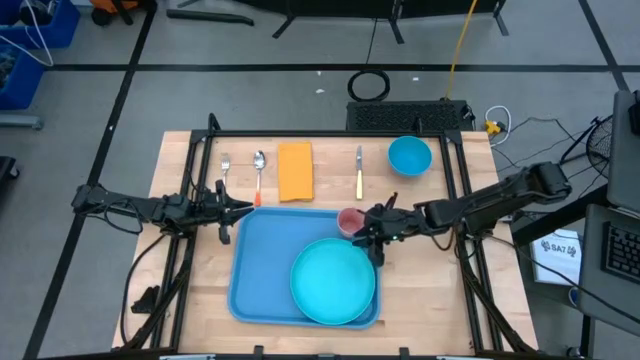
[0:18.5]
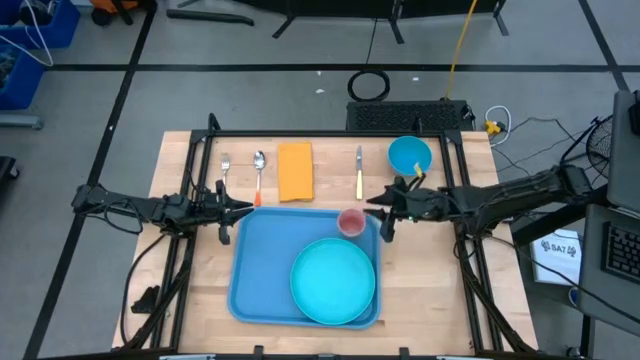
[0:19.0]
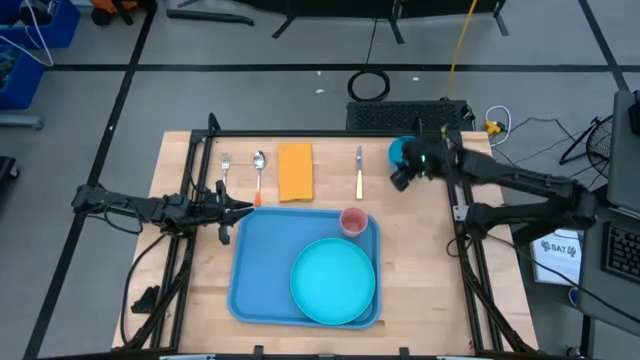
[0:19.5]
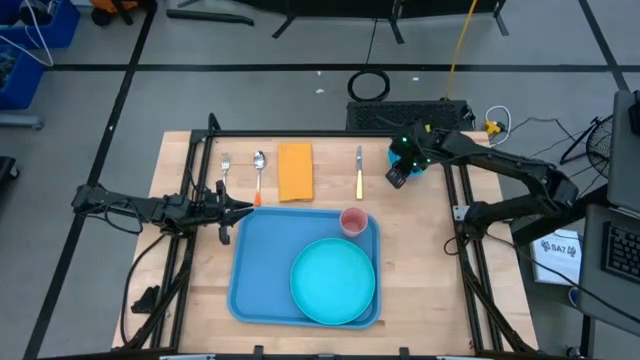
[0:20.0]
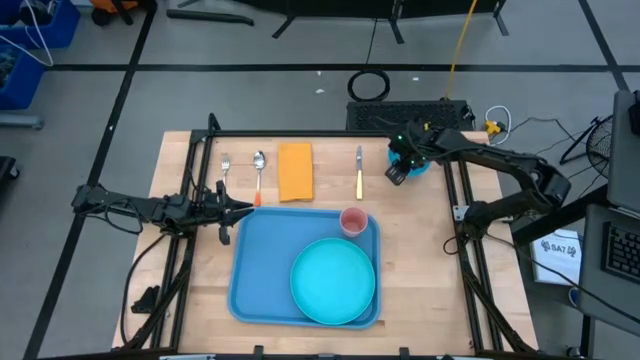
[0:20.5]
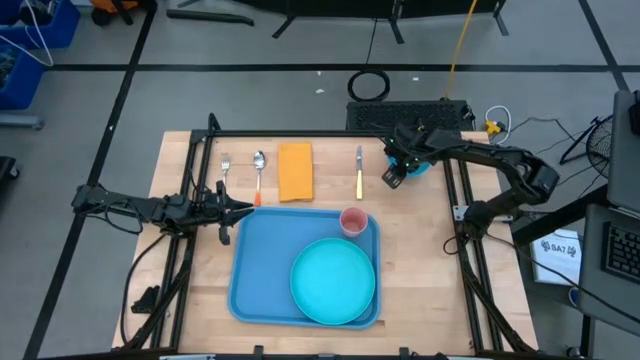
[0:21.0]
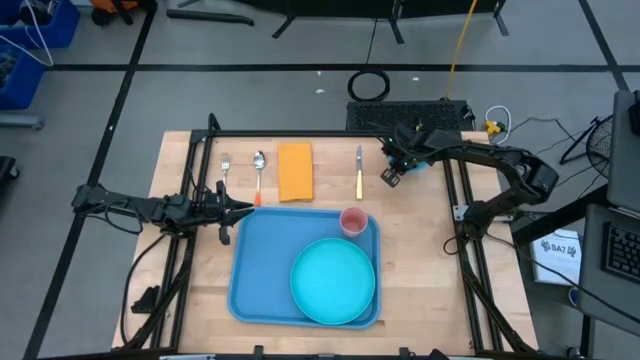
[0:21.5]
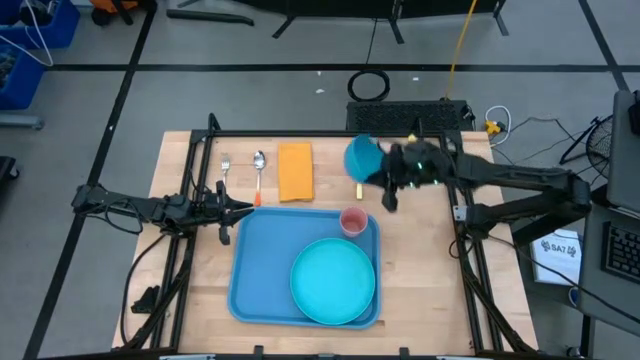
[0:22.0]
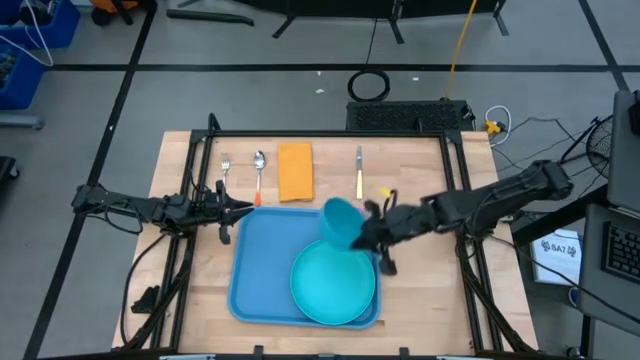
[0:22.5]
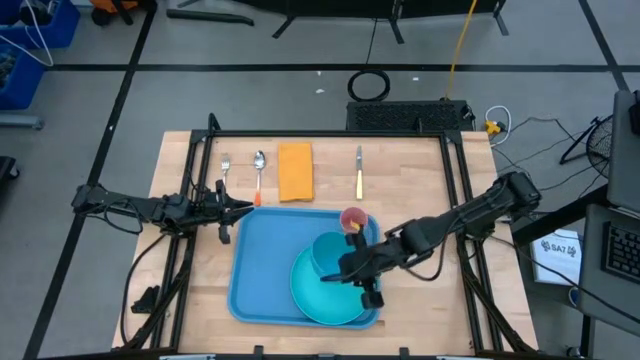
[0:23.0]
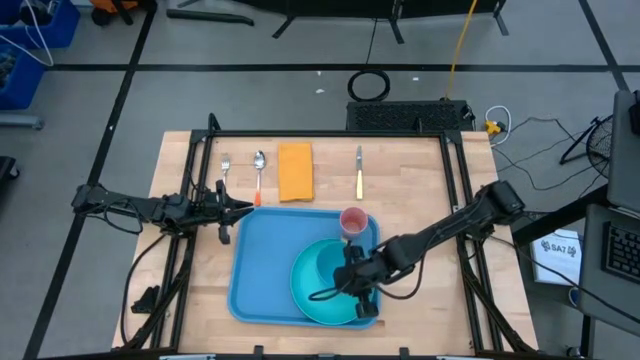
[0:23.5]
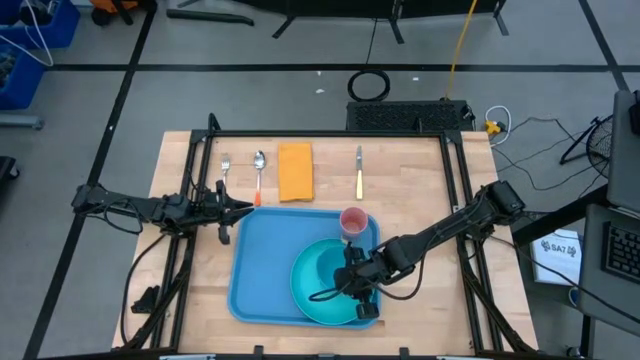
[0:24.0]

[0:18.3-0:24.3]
Task: Set up tray
Put the blue bowl on the light blue plate

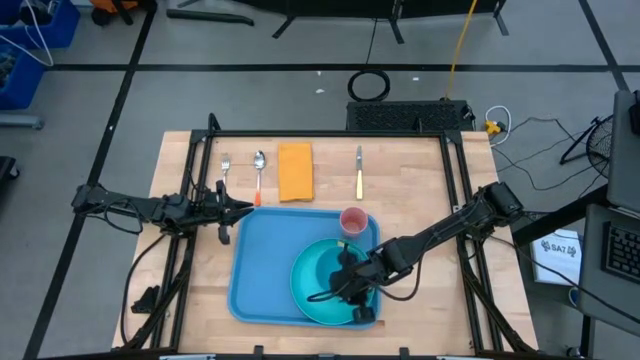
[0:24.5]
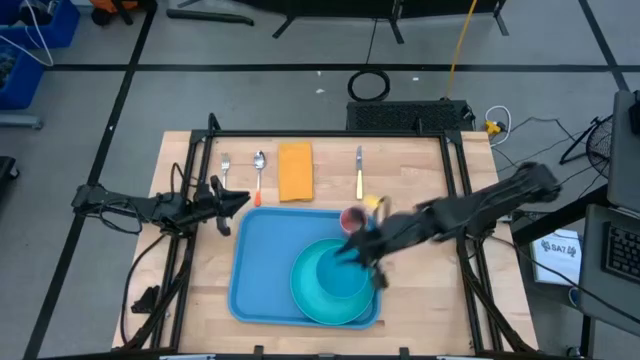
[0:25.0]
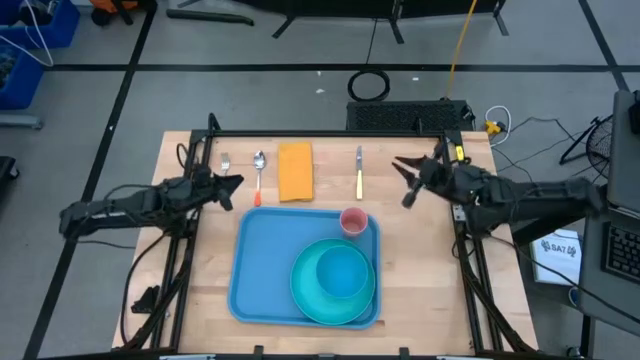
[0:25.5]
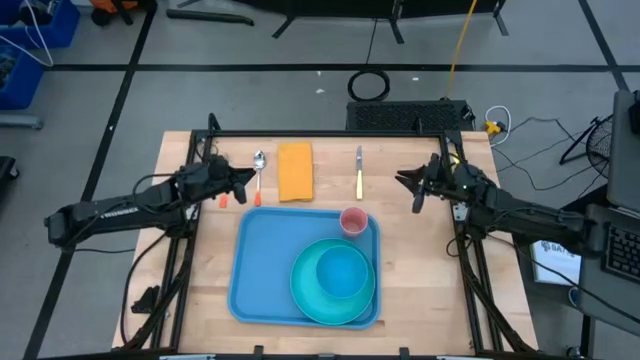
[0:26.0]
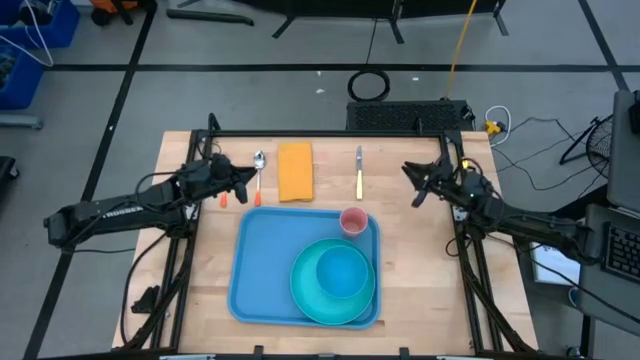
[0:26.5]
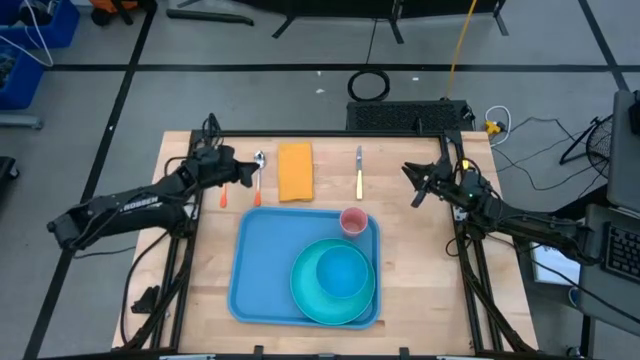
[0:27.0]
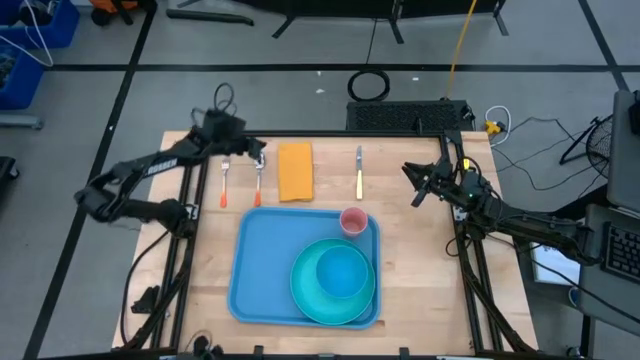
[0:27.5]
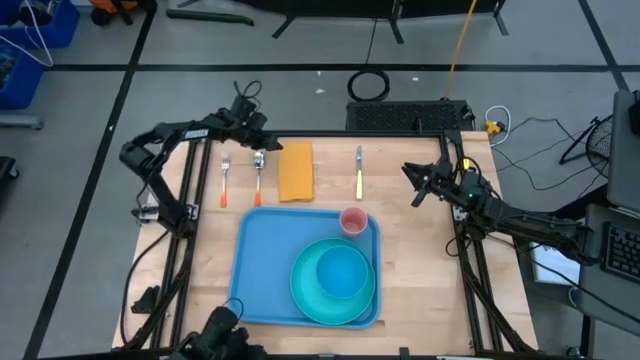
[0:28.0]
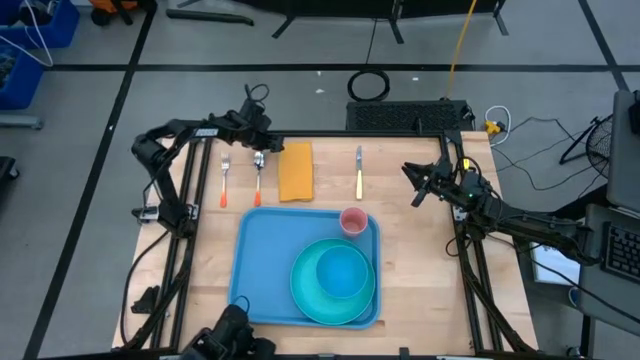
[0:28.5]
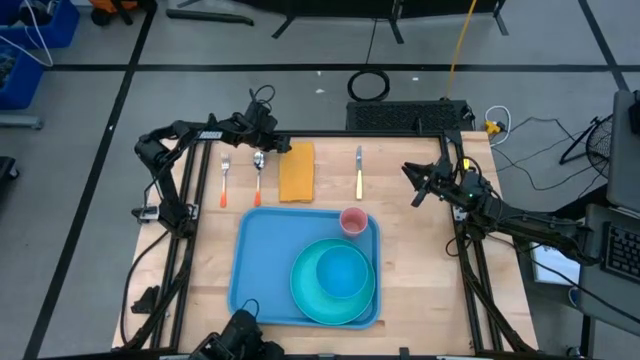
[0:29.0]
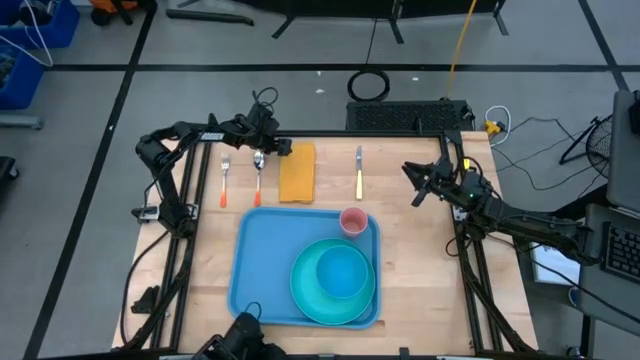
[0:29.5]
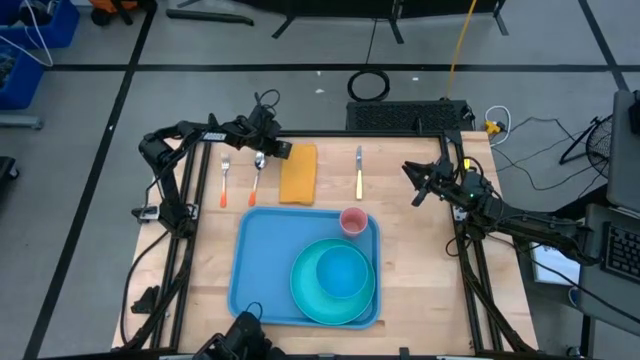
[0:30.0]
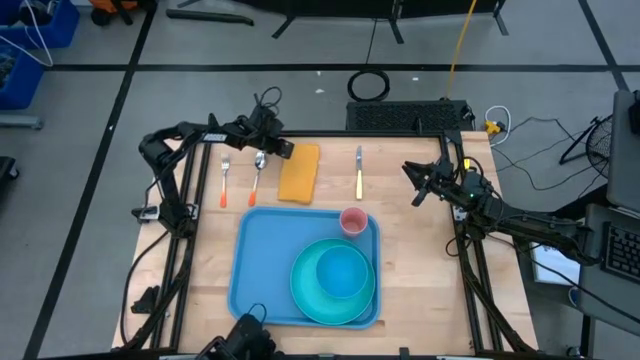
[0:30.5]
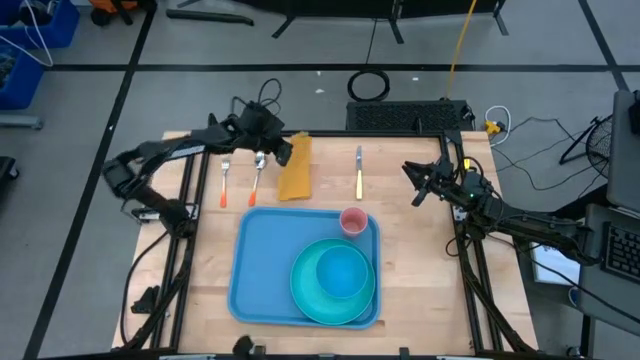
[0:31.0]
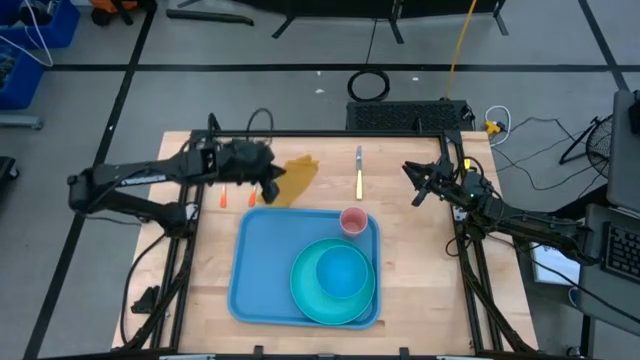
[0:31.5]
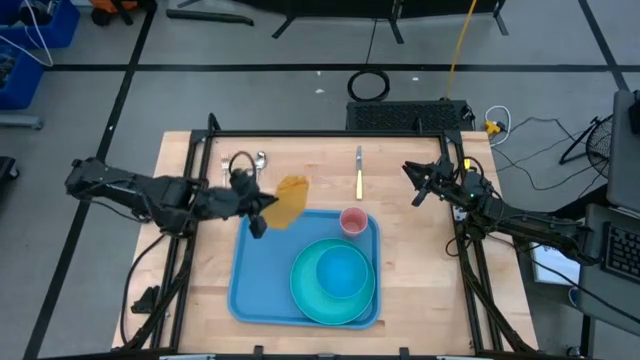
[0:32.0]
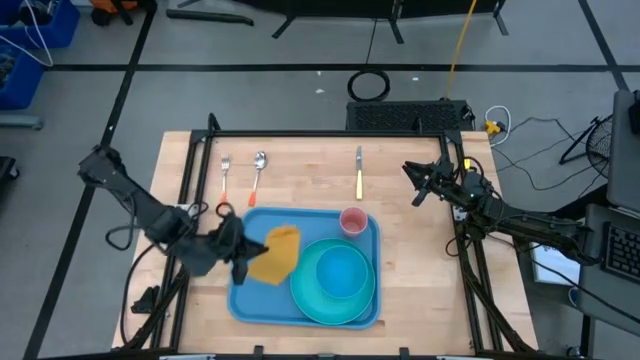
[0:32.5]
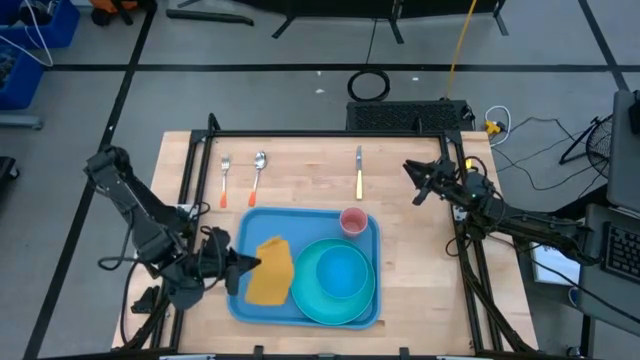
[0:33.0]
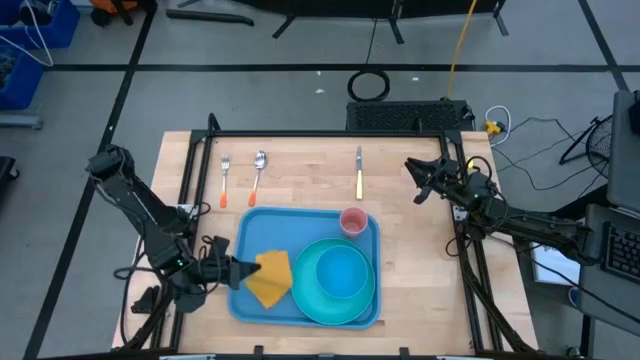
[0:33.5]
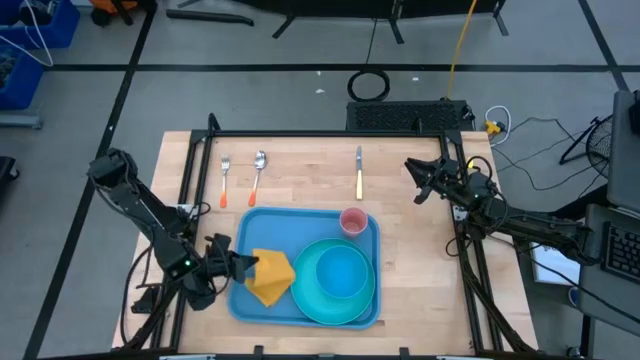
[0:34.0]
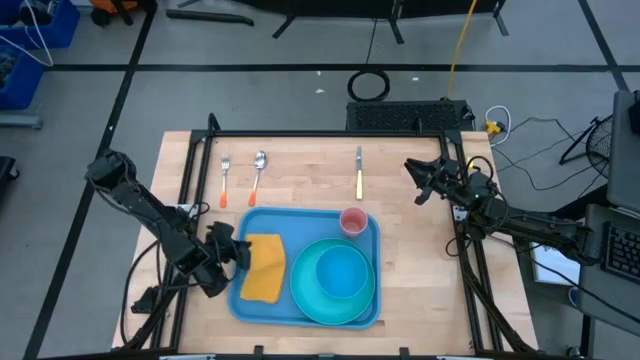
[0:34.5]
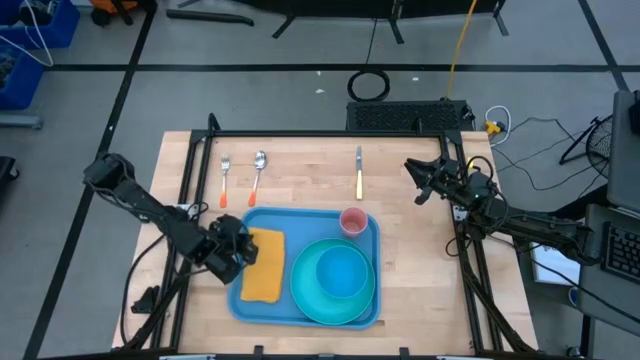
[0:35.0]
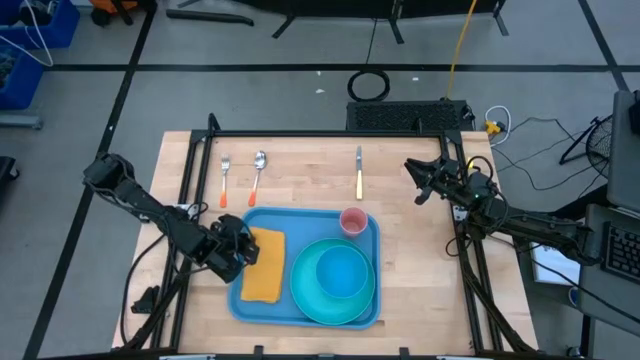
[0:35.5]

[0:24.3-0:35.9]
Put the yellow napkin on the blue serving tray to the left of the light blue plate

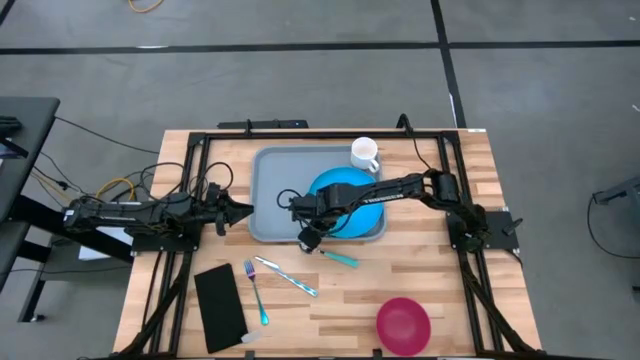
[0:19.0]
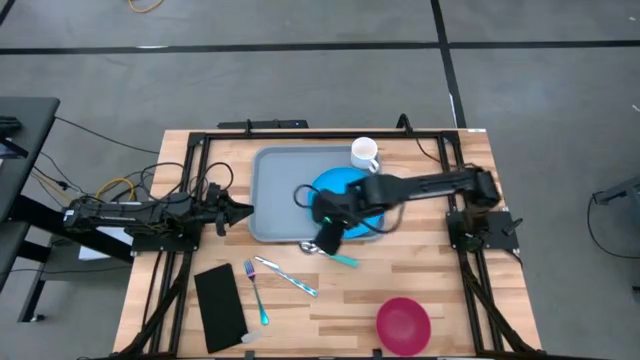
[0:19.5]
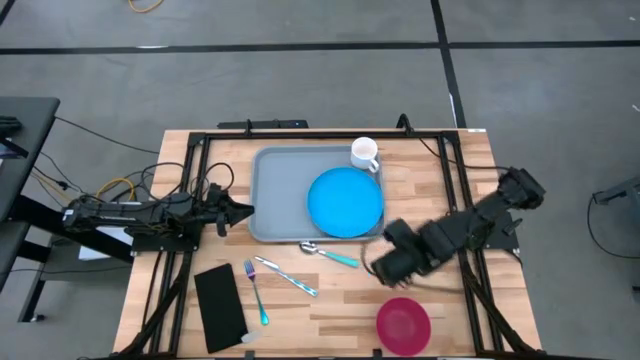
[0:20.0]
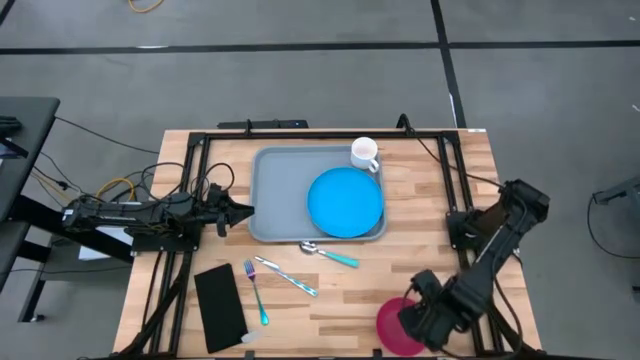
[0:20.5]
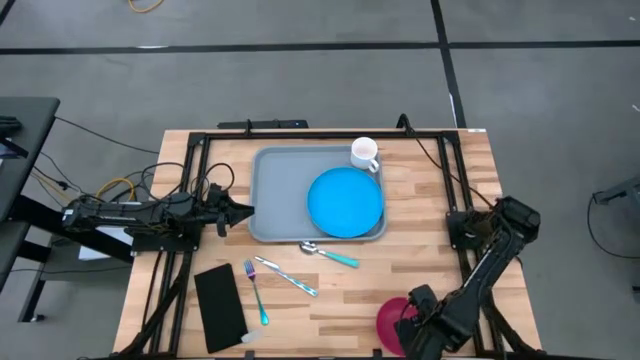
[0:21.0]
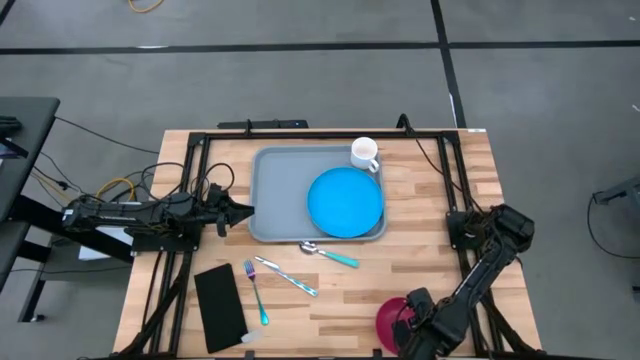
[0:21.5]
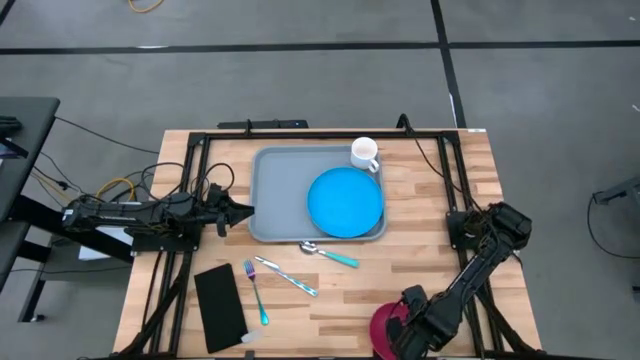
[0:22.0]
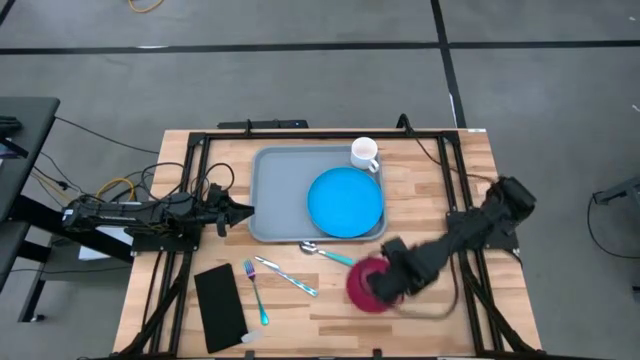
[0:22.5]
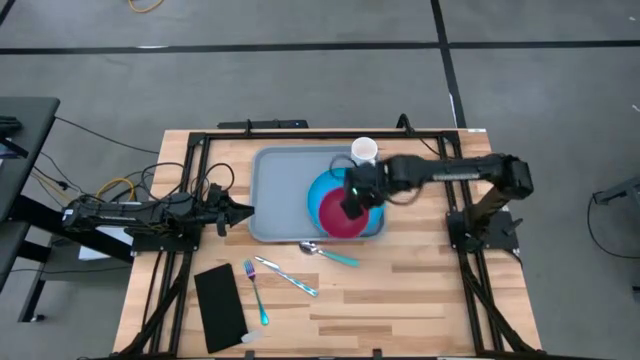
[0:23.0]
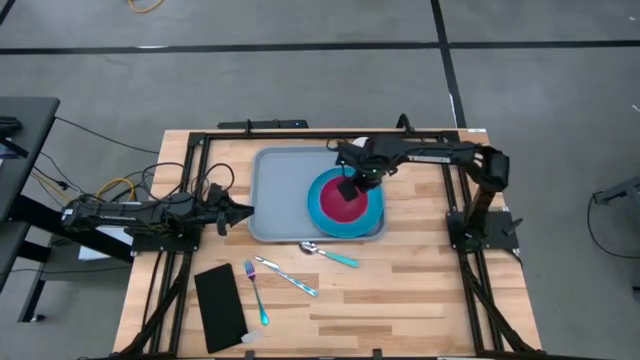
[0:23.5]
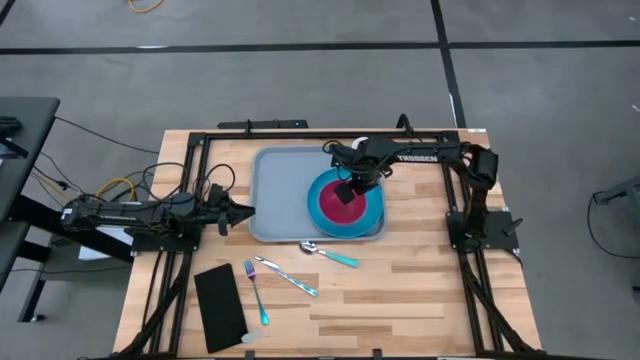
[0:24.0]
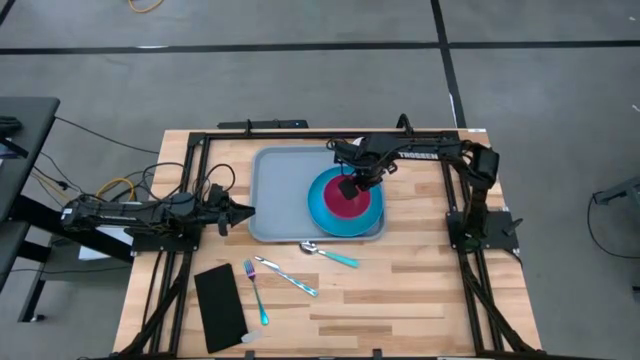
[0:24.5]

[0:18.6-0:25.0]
Task: Set up tray
Put the red bowl on the blue plate on the gray serving tray
